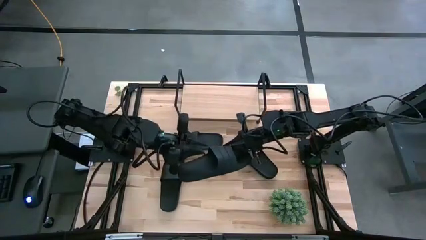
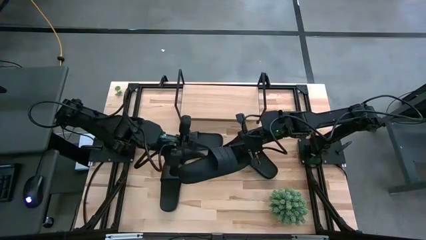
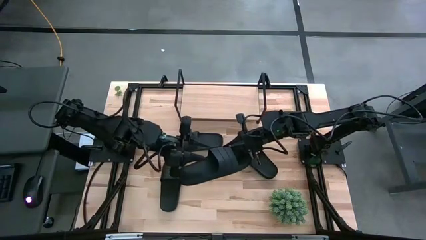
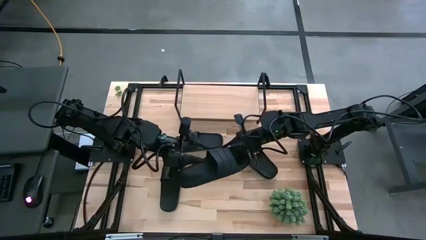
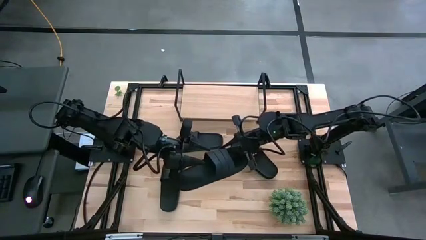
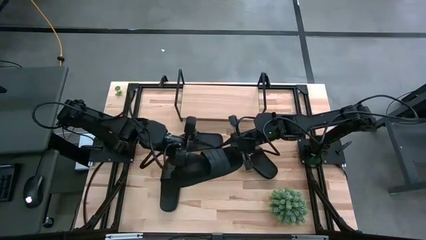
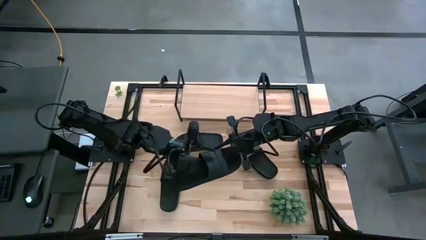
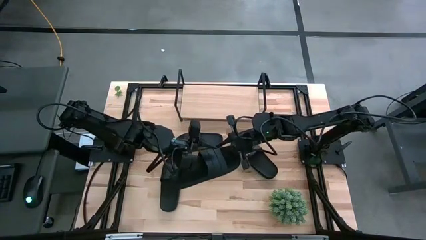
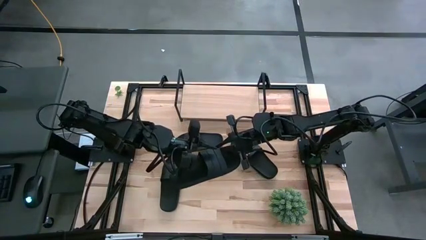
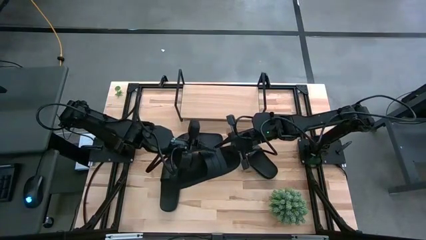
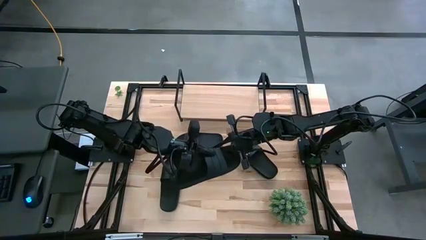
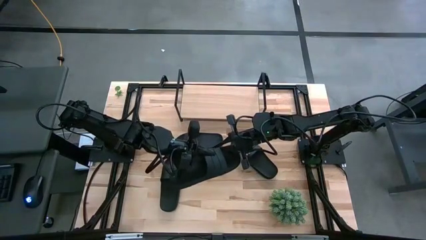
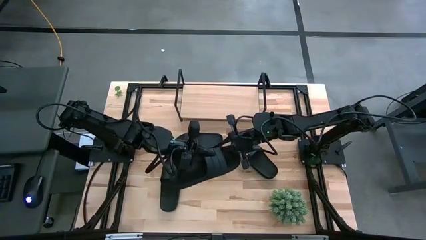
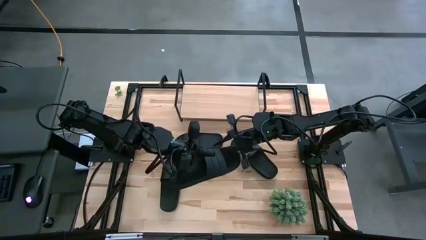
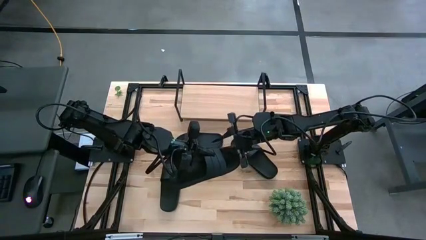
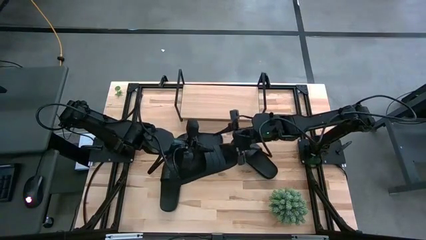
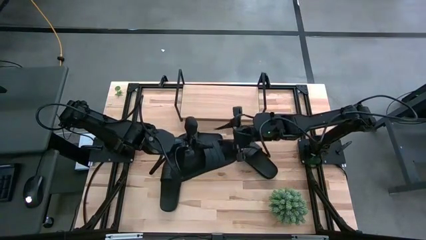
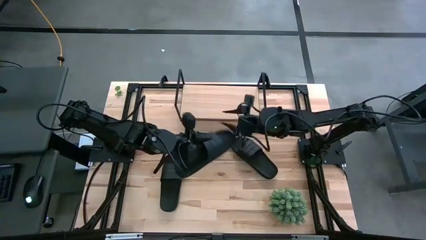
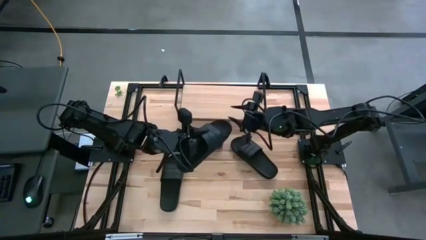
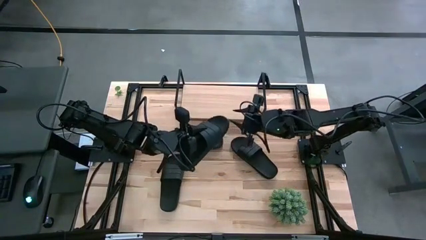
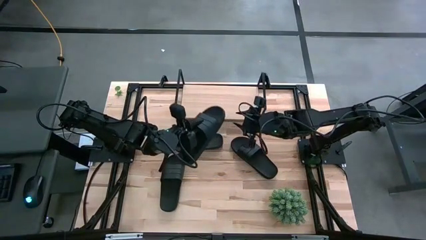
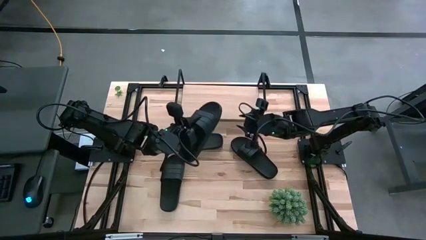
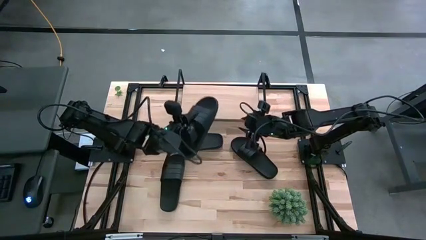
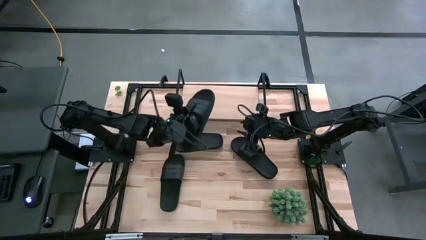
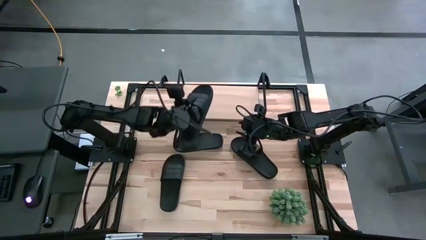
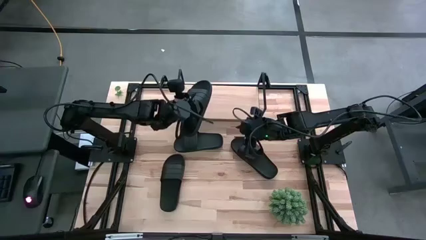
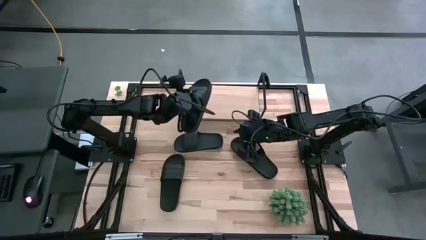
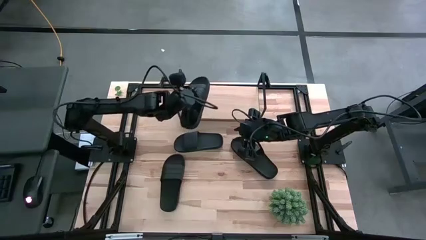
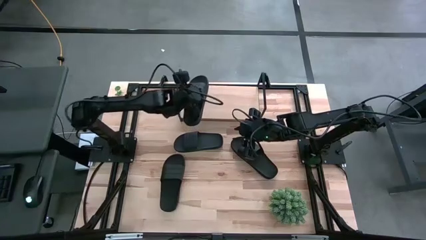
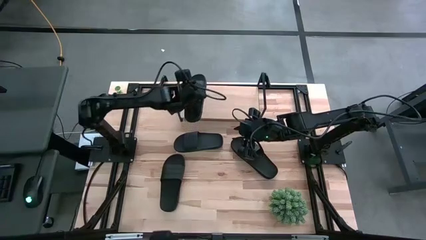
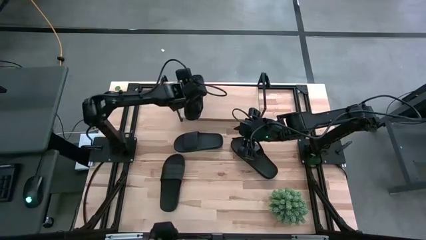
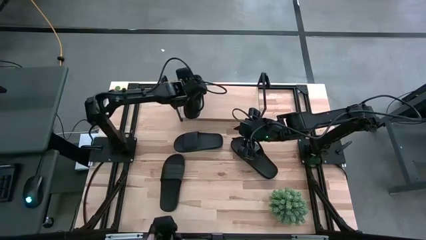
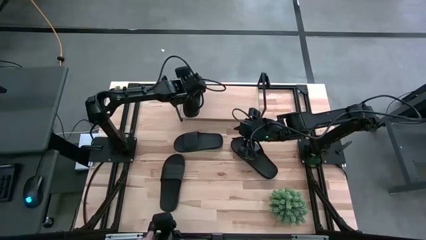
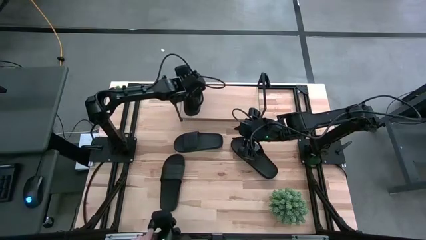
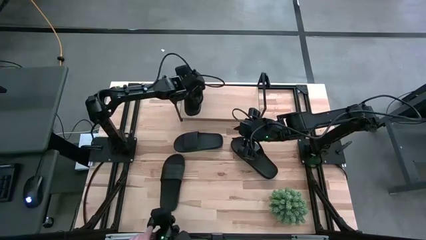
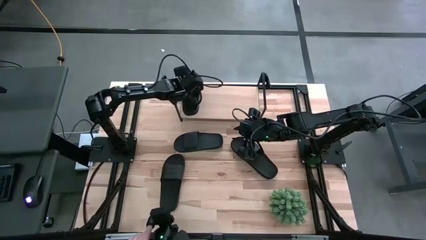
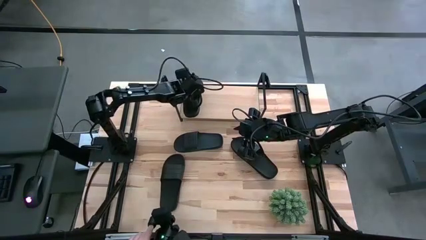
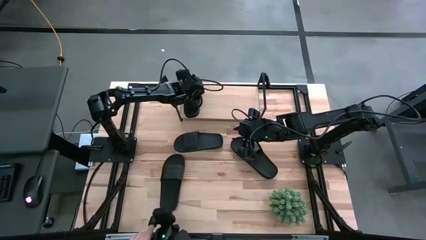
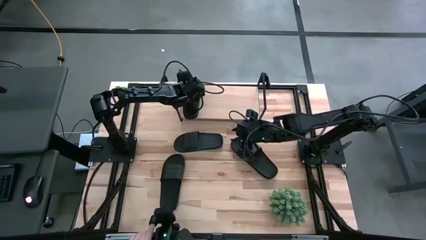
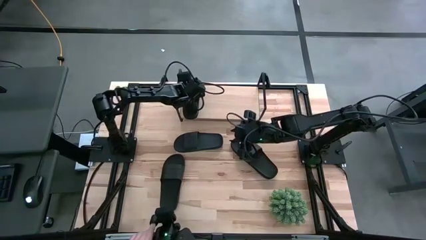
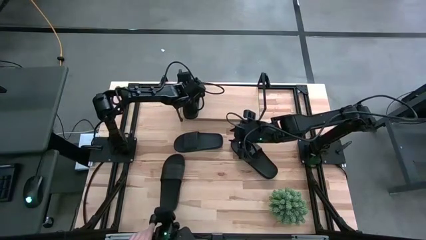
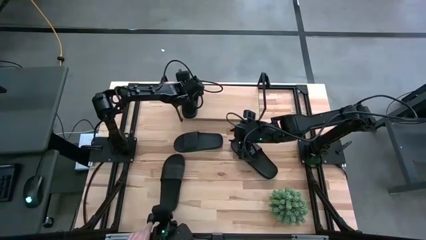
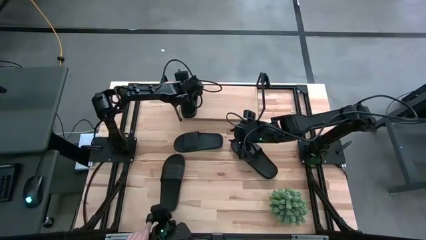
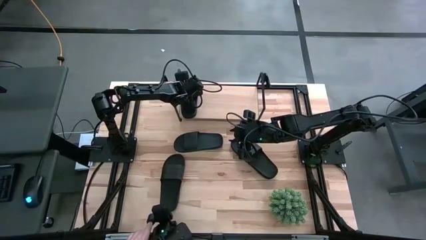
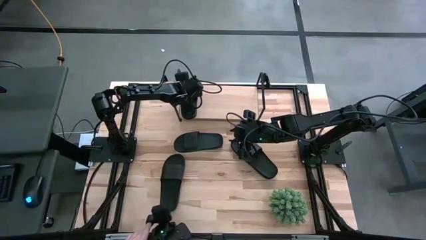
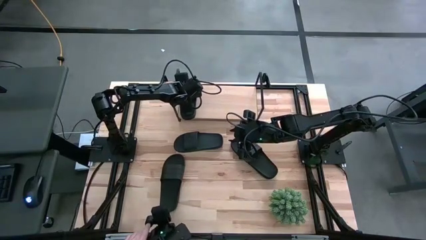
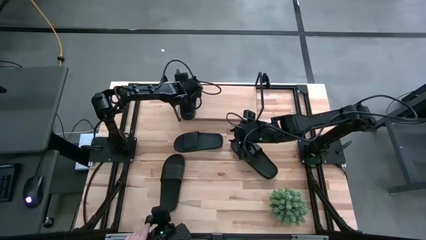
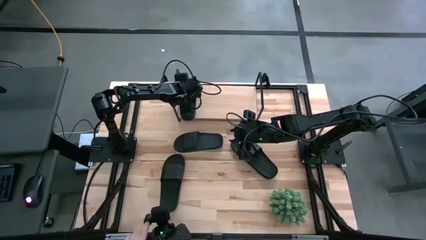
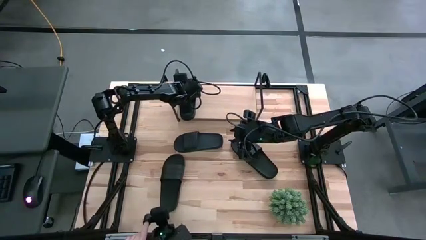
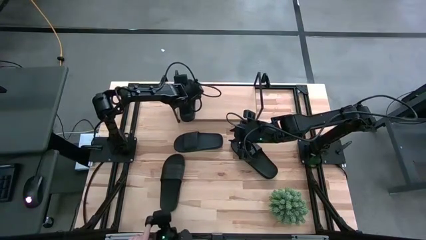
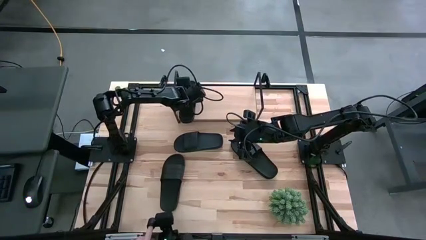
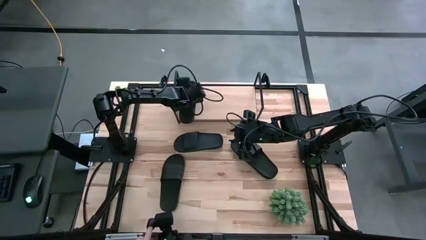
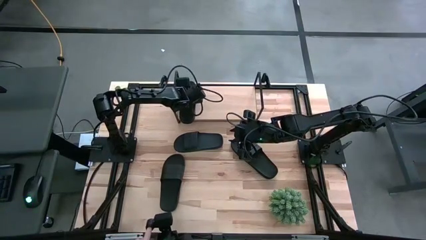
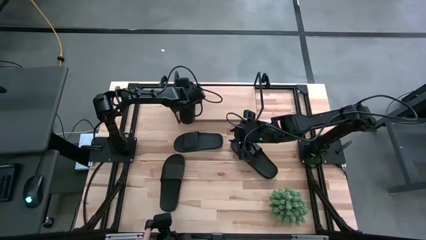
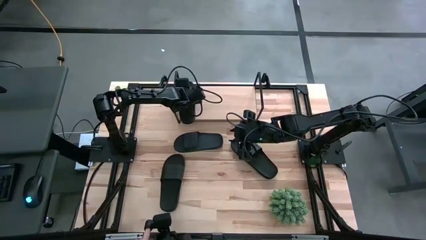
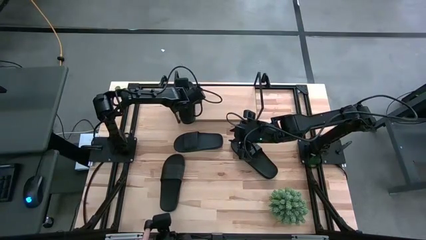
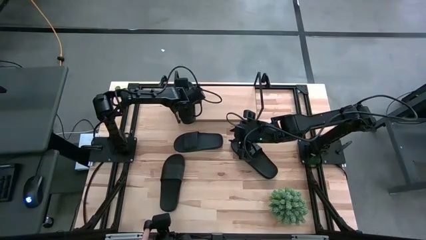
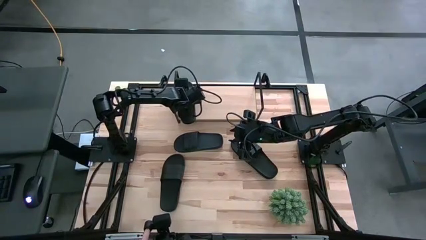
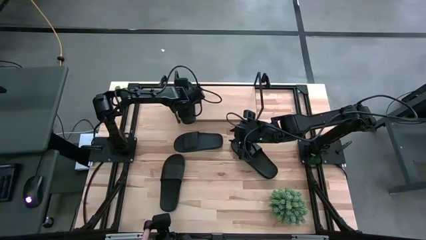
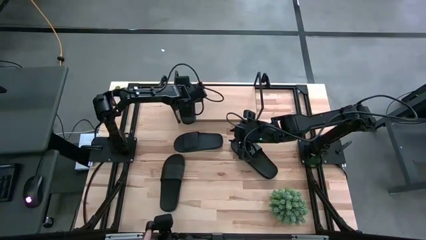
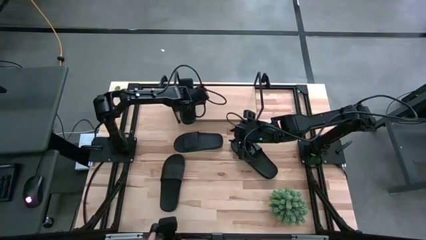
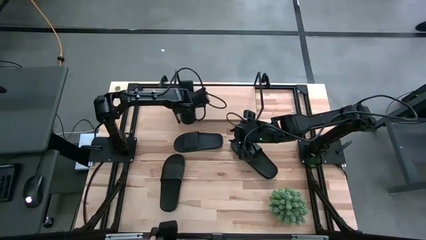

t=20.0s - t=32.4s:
Task: Pick and place slides into the shelf
Put the black slipper on the shelf
